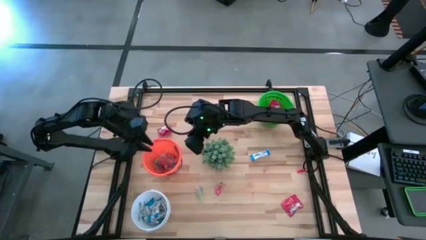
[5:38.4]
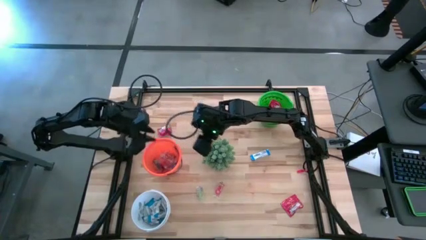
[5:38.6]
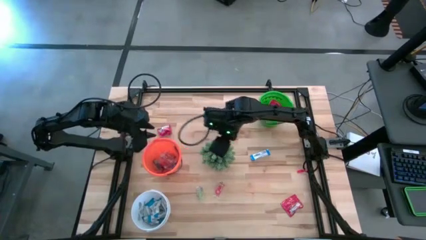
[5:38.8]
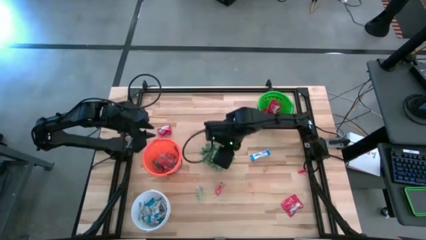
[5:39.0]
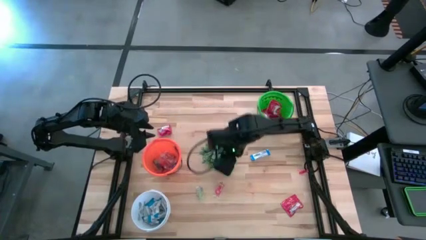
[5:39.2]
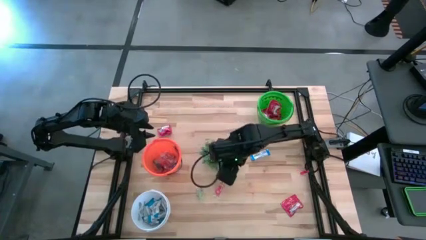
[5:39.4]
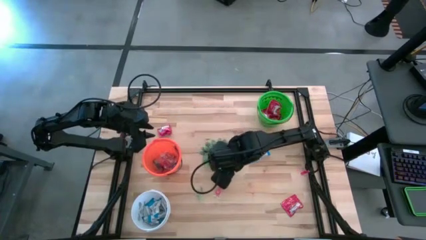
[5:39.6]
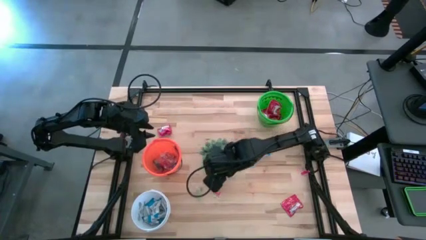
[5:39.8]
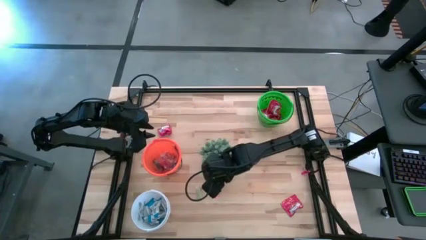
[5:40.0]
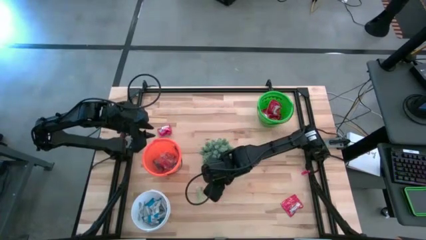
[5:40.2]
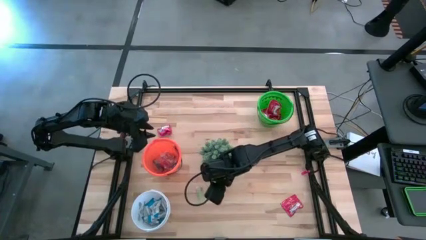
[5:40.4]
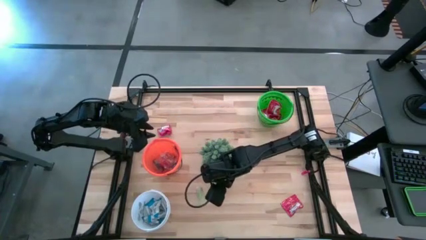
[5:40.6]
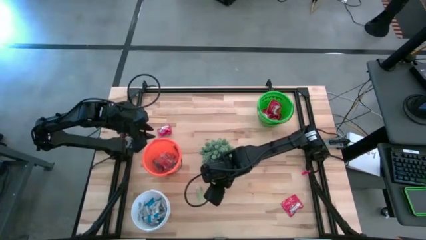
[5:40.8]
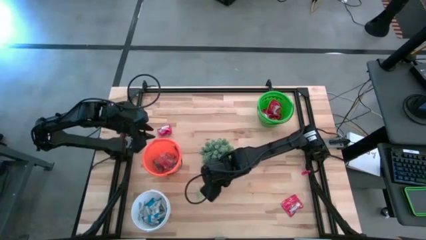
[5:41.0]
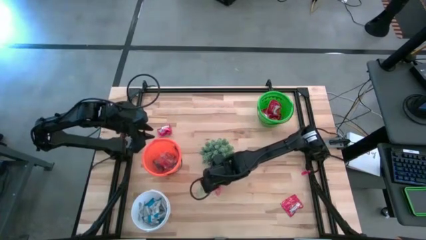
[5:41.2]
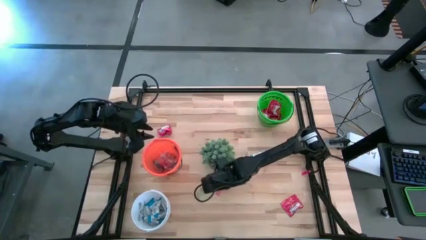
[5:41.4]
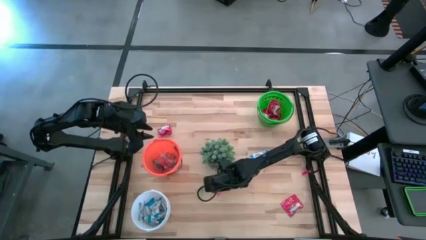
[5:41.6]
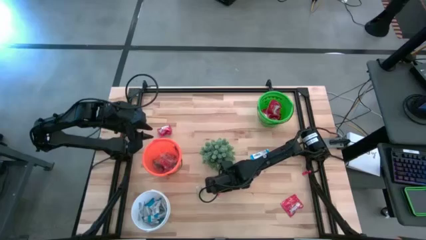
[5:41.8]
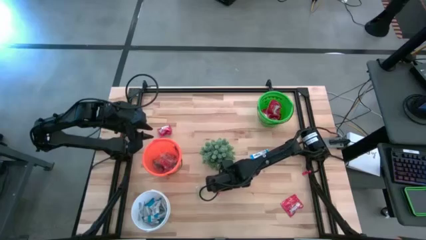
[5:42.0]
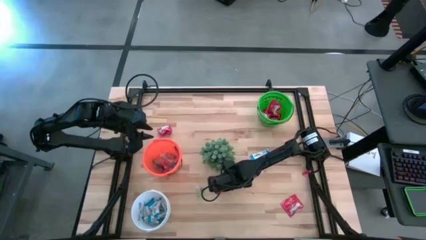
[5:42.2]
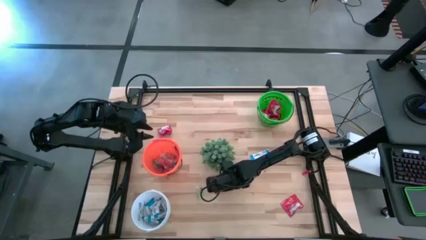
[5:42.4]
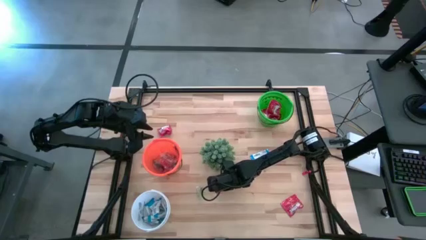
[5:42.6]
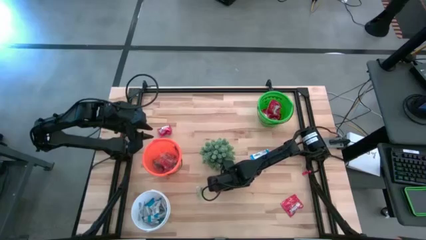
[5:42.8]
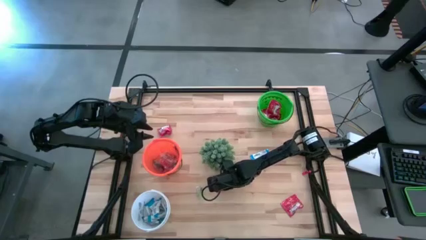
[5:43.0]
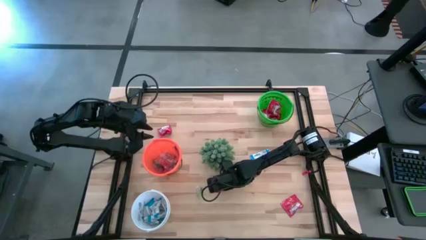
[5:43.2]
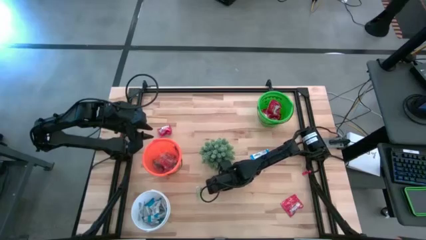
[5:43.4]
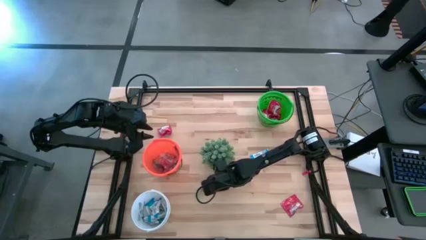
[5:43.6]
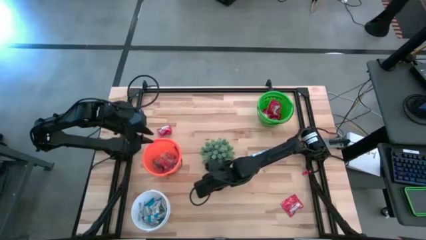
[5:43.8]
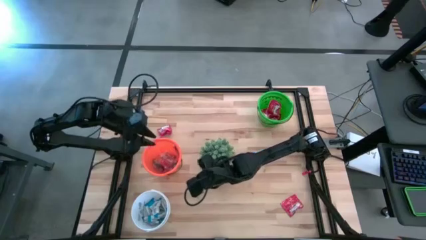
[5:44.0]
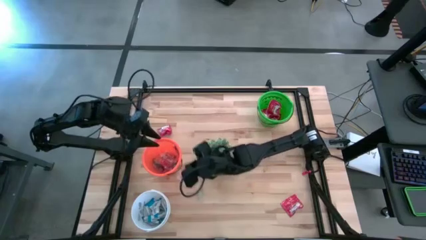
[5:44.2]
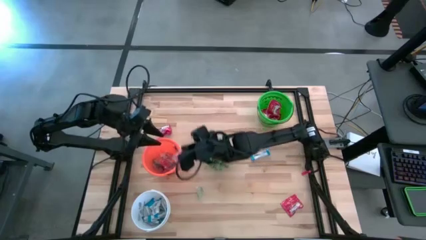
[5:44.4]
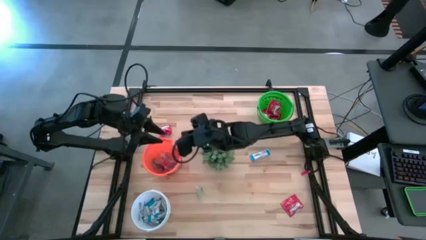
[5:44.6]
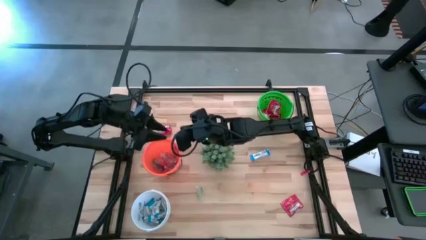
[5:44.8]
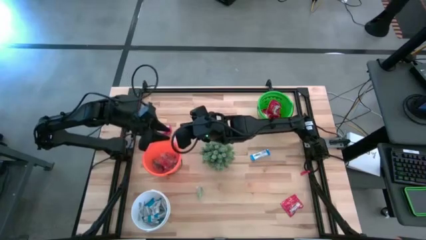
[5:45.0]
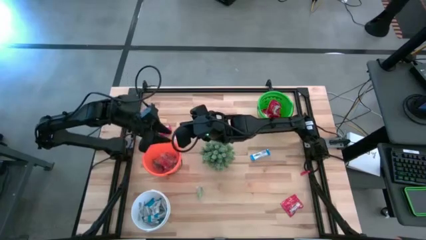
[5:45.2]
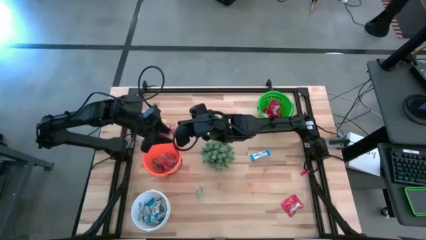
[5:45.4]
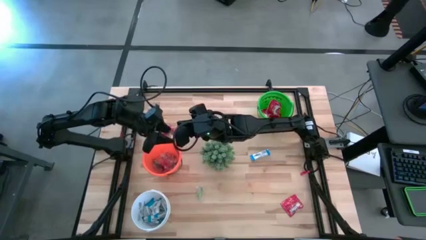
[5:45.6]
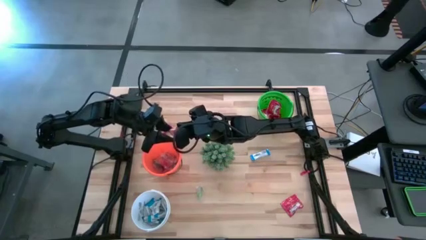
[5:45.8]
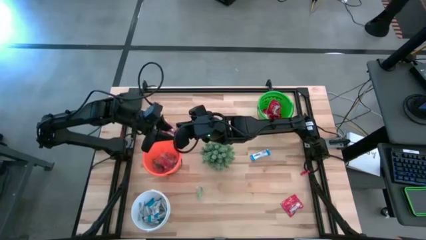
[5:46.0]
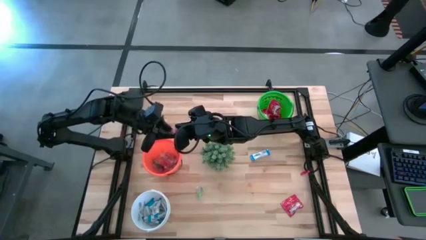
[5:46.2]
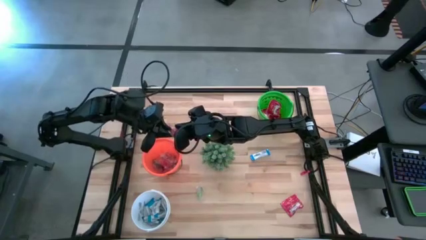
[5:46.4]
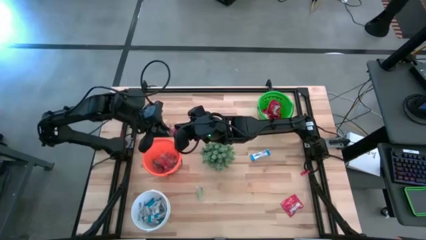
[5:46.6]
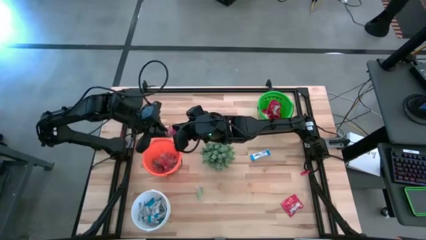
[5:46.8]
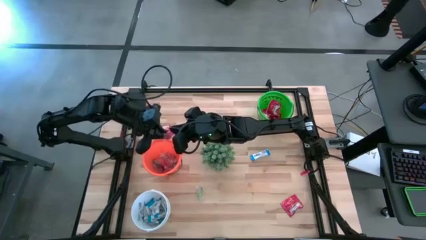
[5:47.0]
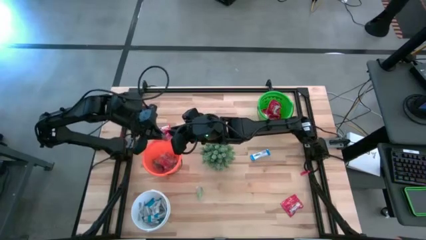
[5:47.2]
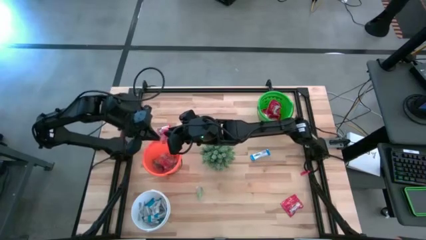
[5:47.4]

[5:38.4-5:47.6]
Task: Sort candy
Put the red gummy into the orange bucket

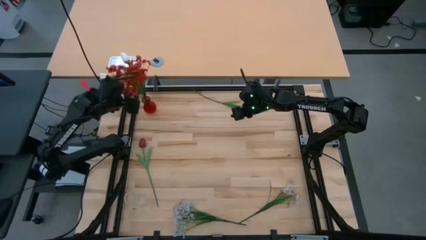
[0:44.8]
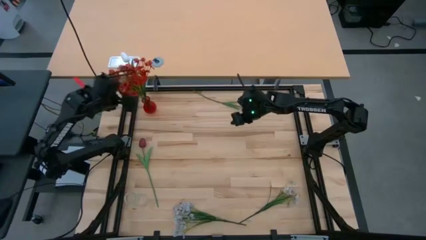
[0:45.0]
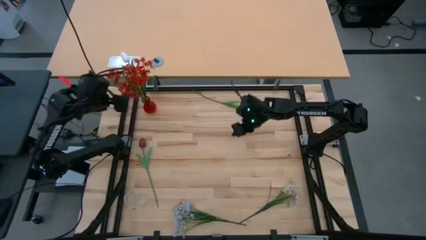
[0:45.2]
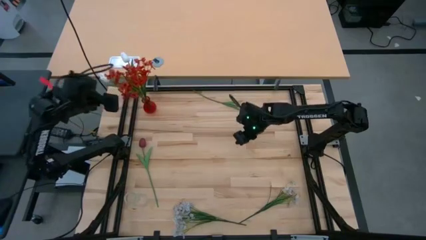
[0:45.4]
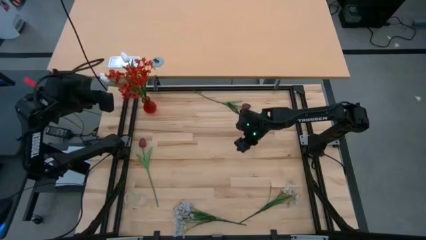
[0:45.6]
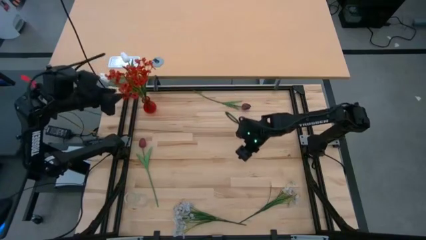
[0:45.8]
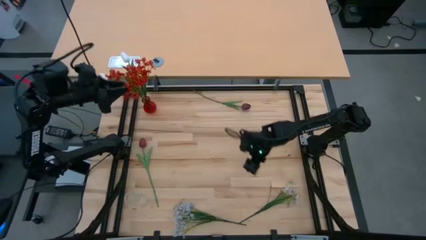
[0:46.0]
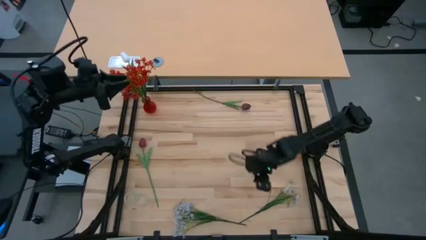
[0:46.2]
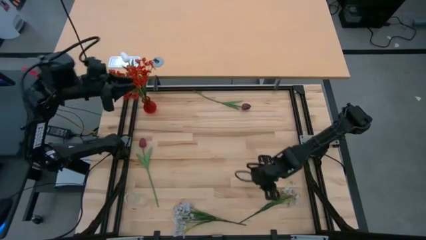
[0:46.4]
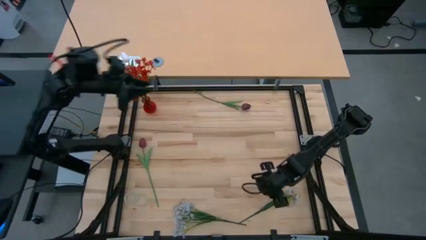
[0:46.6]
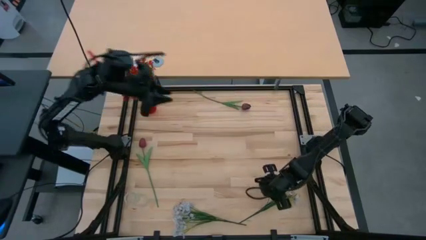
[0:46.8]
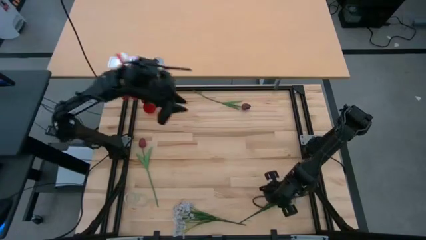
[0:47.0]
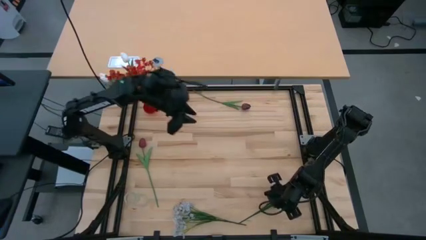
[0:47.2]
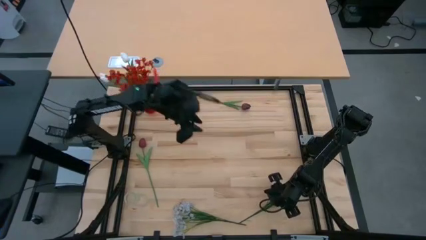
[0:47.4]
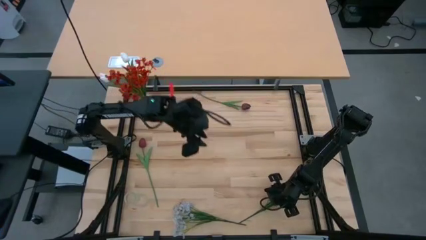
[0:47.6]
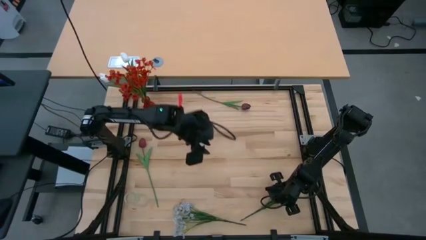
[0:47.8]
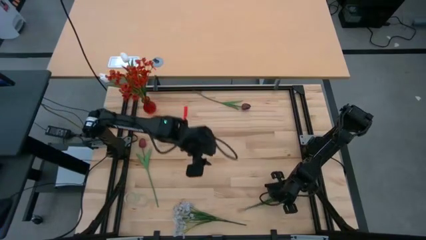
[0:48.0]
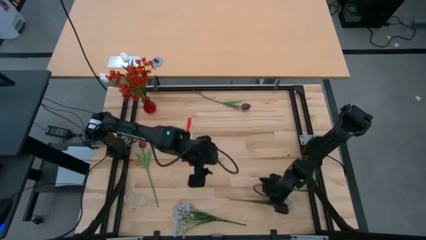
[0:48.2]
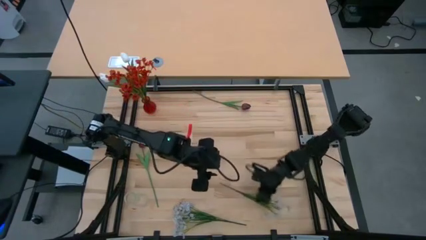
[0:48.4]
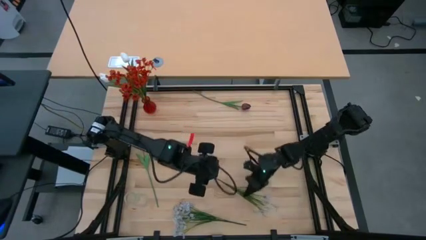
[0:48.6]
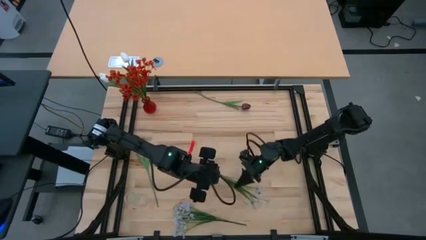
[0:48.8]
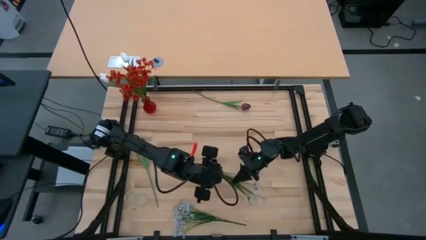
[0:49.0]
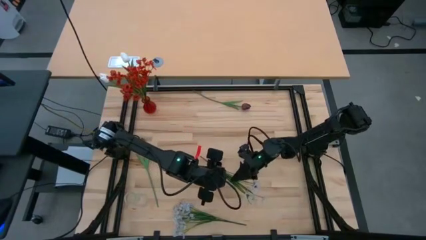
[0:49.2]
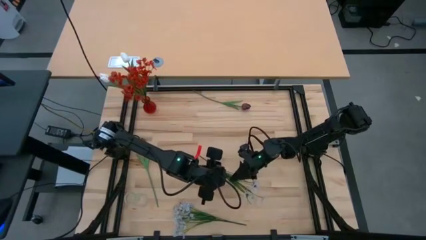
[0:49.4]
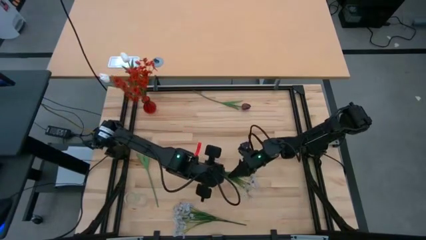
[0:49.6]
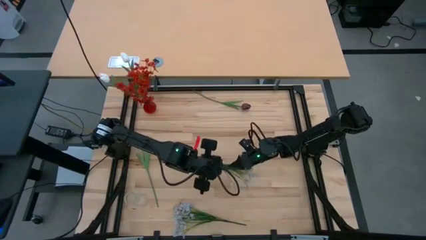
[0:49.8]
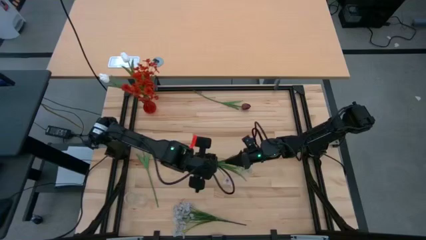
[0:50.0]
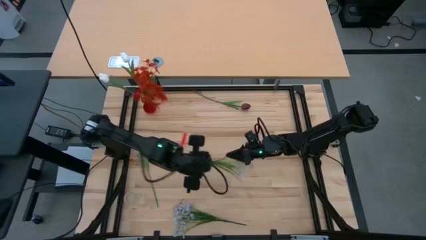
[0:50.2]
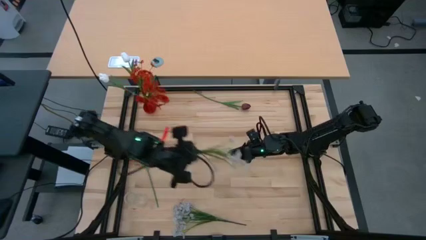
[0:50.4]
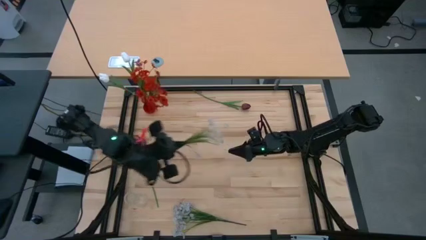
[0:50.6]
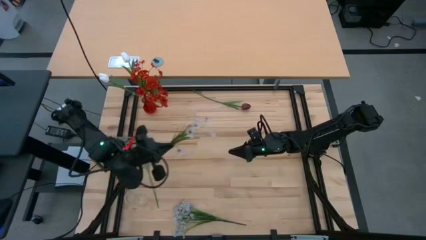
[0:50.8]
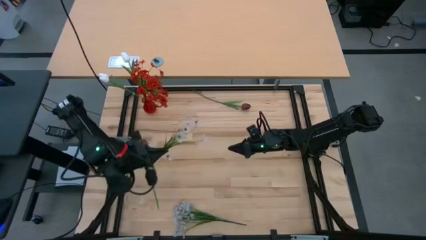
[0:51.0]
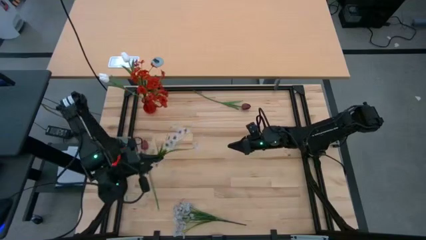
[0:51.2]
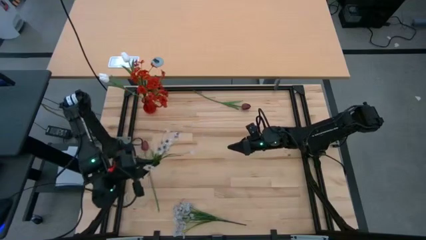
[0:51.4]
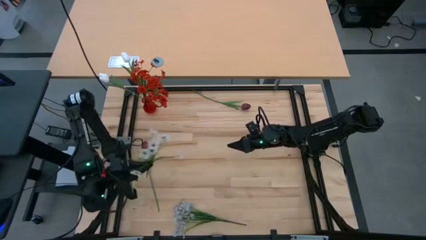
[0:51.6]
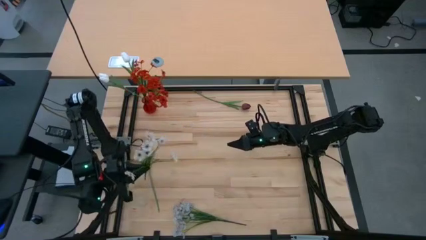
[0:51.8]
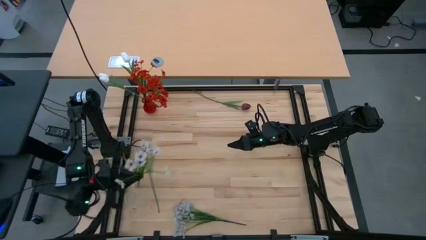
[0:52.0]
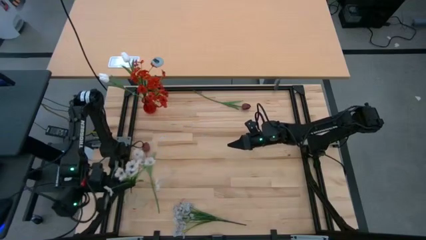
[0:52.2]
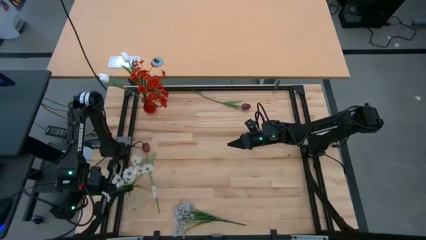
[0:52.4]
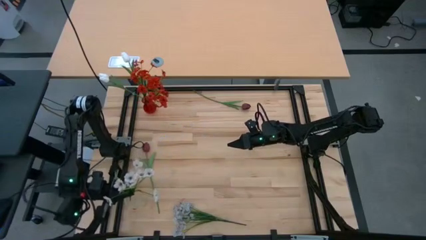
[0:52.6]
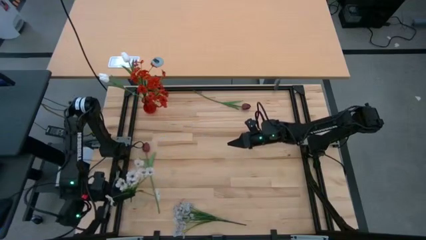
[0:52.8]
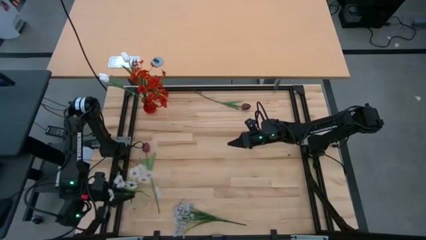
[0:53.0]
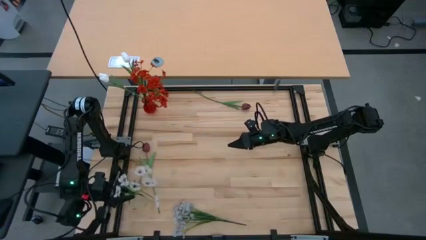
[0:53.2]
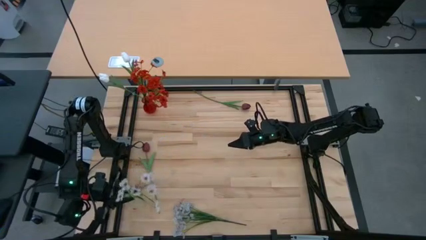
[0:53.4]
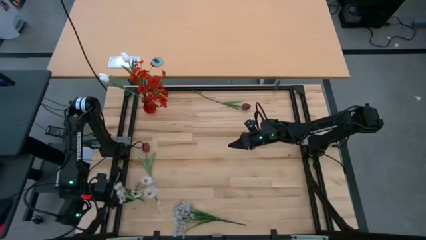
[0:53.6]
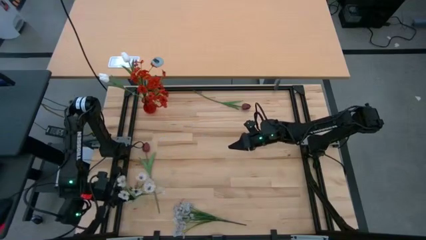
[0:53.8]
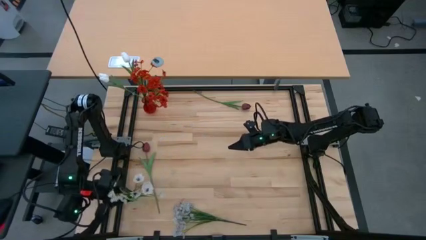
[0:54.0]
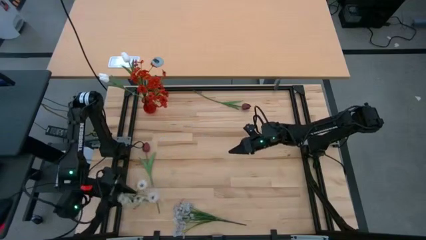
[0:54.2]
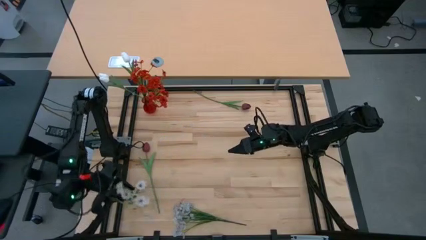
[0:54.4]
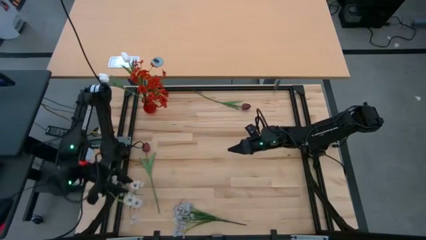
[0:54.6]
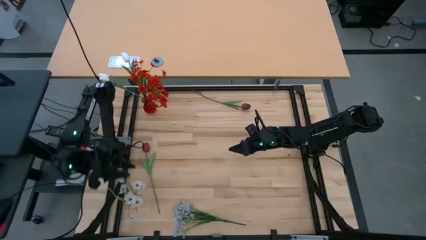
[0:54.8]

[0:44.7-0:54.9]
Task: Sort flowers into vase by color
Put the right white flowers into the transparent vase
